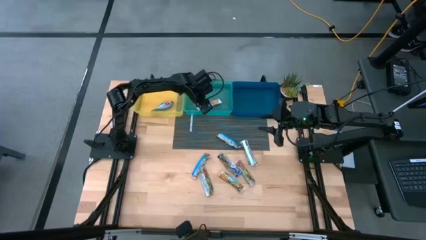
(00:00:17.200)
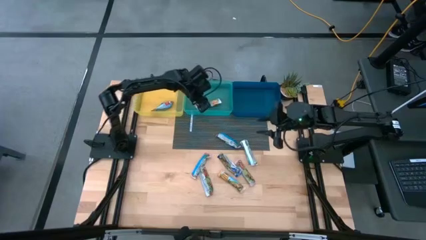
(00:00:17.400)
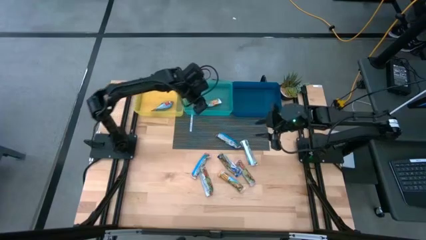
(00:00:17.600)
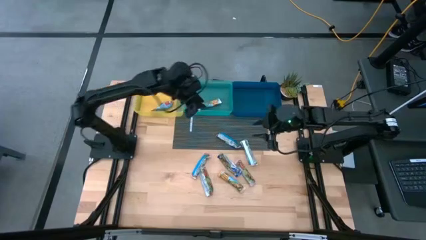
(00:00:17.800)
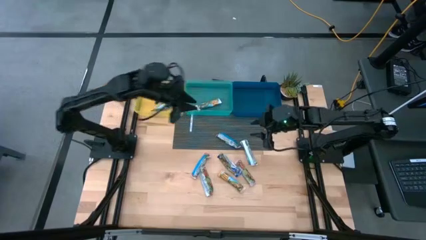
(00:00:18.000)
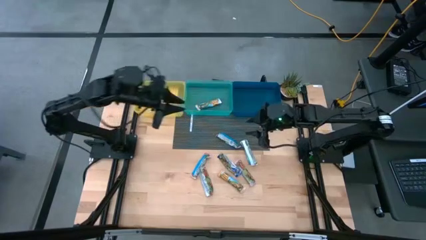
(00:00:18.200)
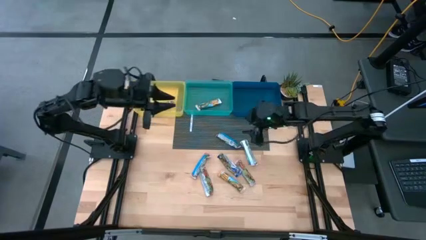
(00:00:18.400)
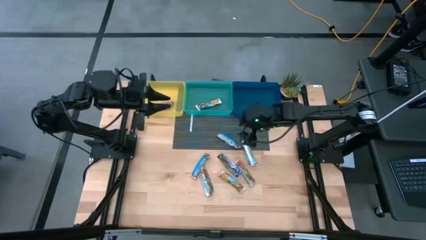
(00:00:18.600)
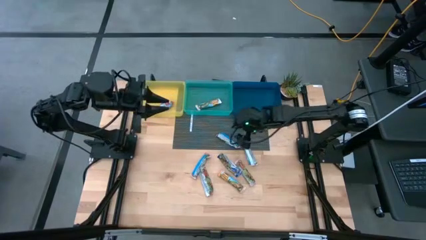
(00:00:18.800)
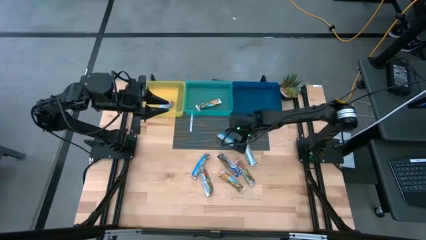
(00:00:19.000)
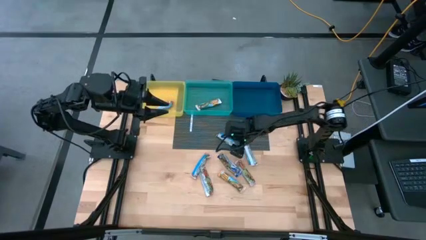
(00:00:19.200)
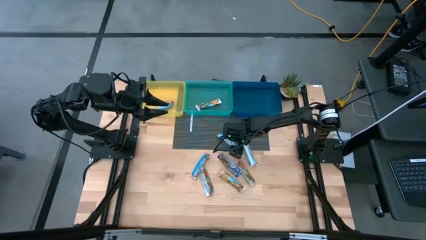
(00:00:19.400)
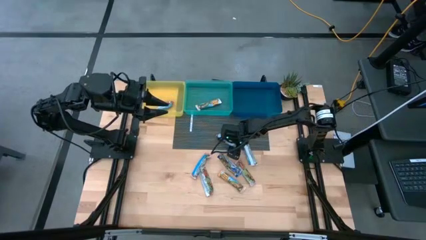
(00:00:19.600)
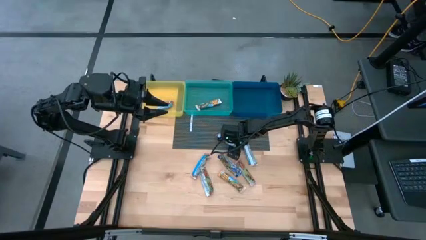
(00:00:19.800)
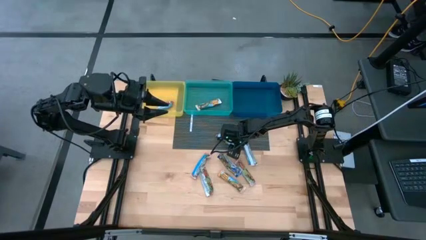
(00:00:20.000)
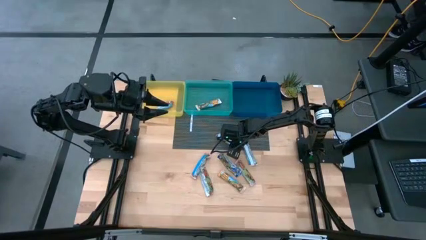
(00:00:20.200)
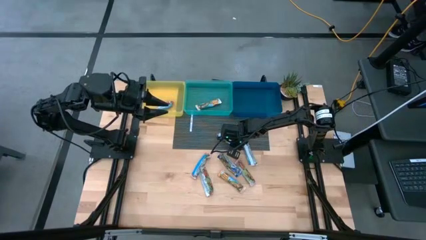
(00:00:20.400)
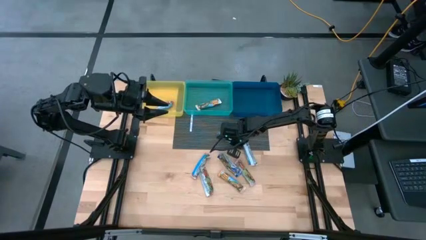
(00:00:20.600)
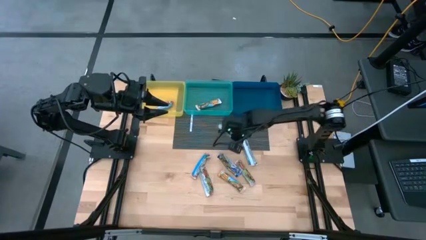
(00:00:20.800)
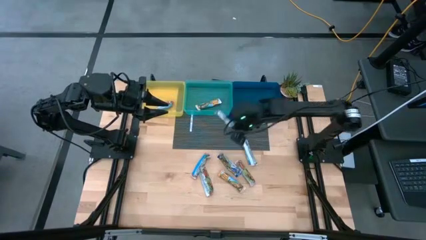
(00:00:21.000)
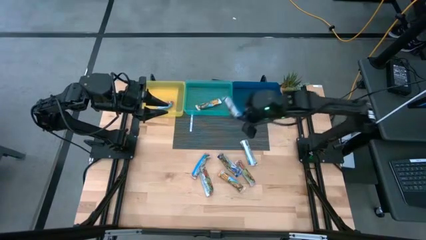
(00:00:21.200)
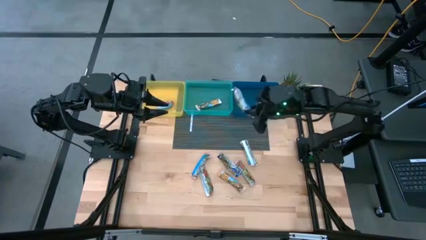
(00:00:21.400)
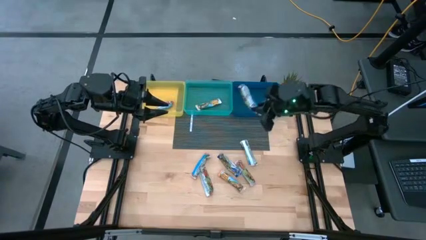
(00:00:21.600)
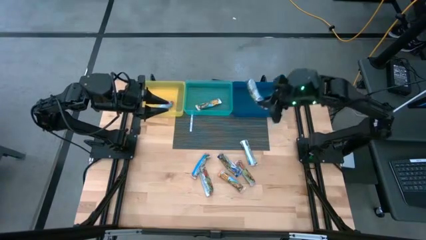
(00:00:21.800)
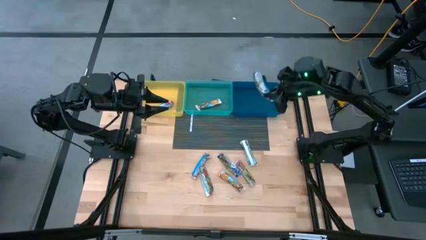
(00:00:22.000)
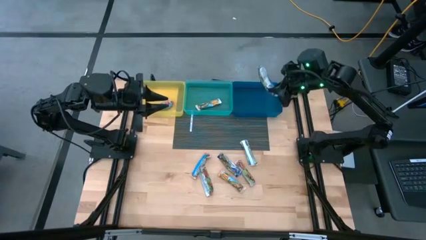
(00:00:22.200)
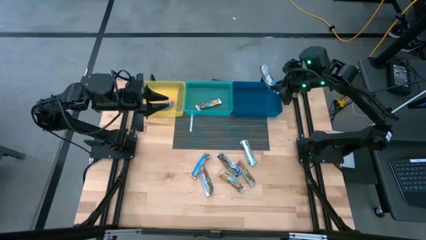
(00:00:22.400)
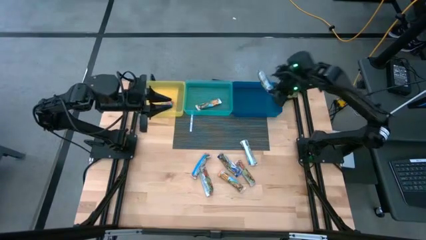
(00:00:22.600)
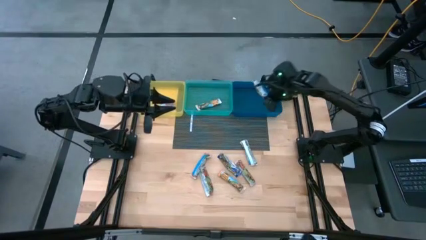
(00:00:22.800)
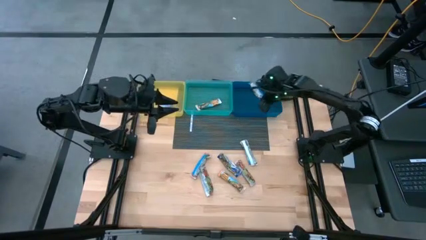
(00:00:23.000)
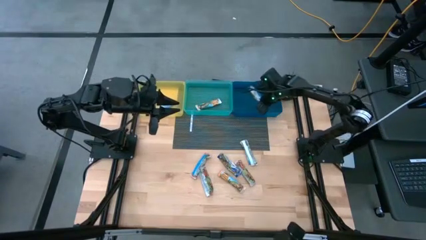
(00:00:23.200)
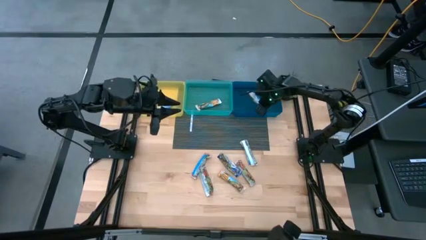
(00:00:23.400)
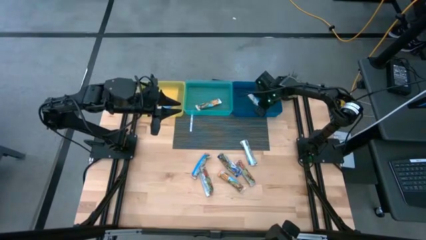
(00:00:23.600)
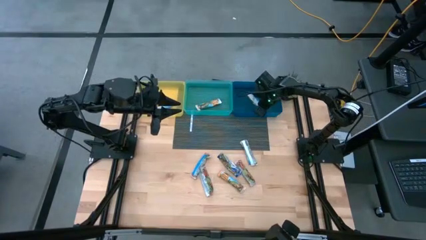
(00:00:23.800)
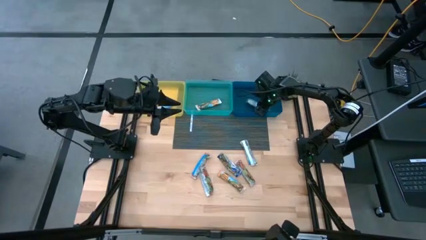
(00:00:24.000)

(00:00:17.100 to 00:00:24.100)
Task: Pick and place Granola Bars by type
Put the blue granola bar into the dark blue bin

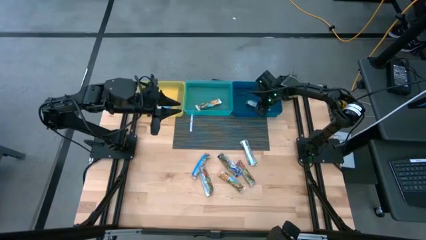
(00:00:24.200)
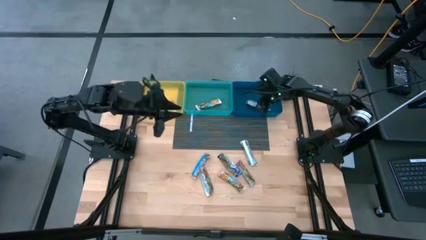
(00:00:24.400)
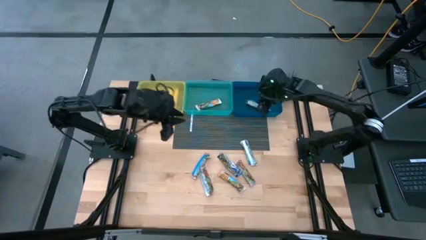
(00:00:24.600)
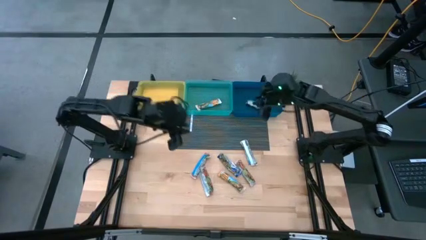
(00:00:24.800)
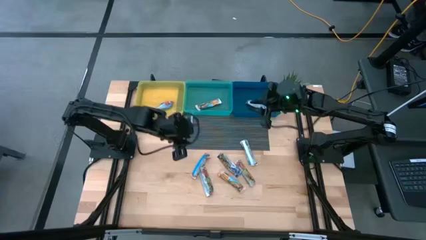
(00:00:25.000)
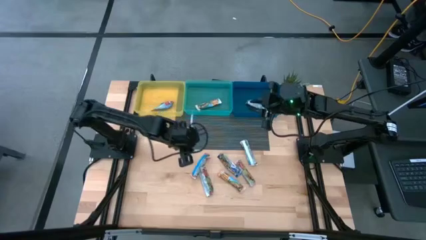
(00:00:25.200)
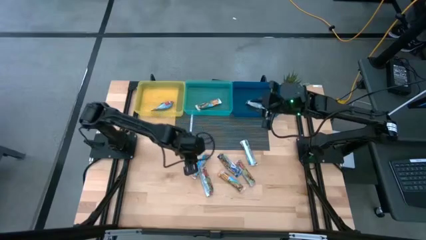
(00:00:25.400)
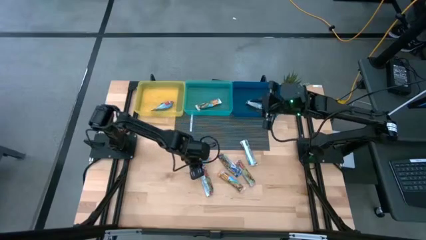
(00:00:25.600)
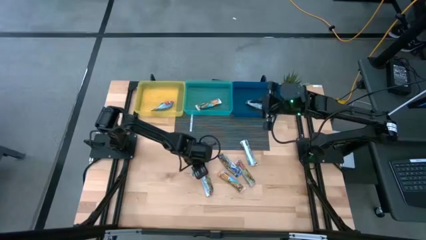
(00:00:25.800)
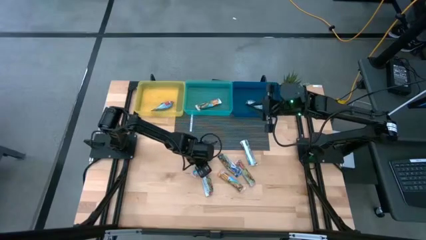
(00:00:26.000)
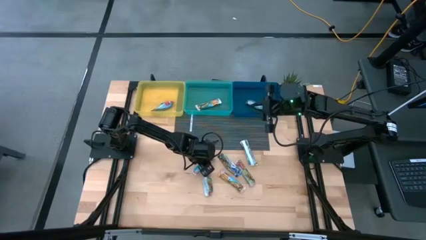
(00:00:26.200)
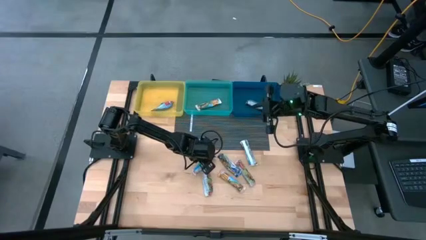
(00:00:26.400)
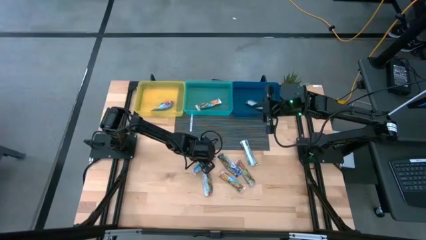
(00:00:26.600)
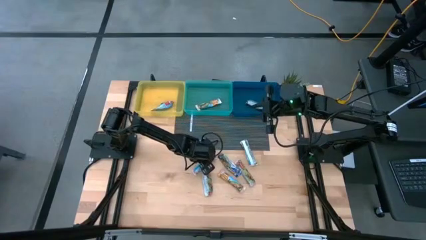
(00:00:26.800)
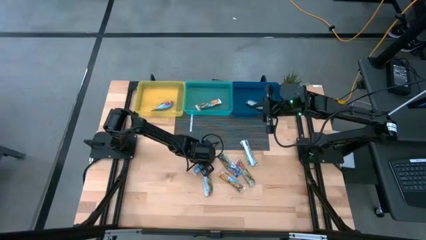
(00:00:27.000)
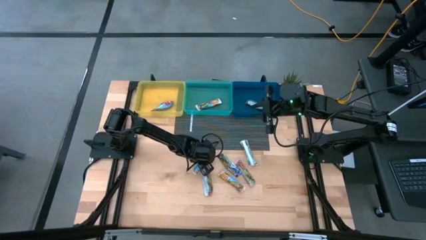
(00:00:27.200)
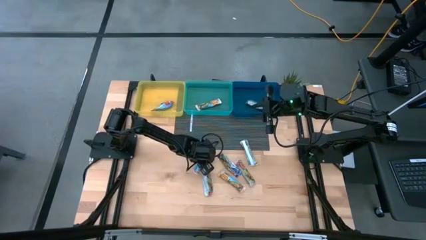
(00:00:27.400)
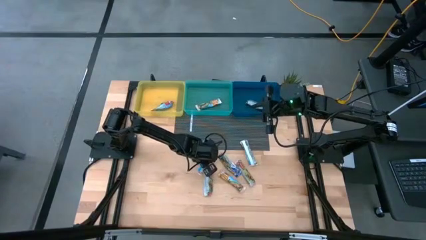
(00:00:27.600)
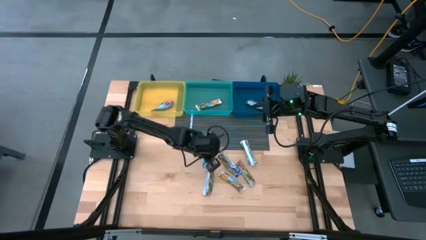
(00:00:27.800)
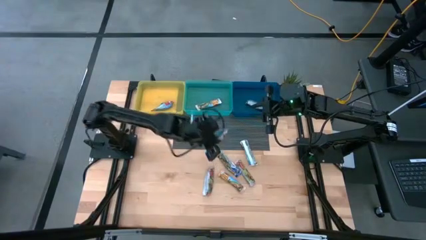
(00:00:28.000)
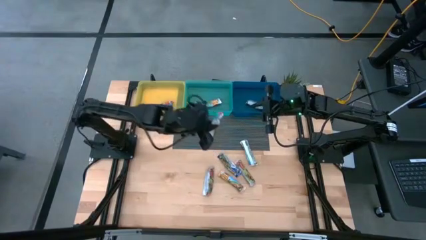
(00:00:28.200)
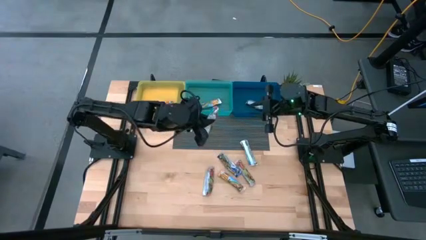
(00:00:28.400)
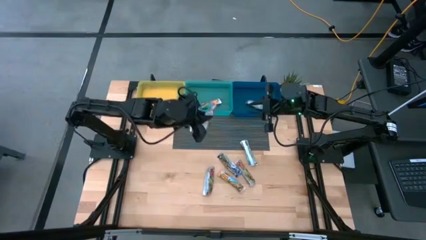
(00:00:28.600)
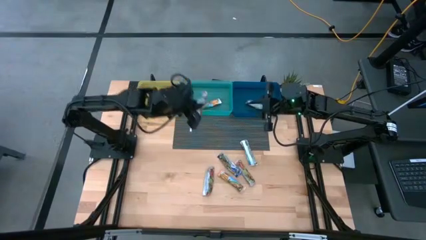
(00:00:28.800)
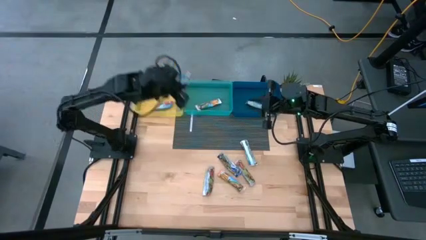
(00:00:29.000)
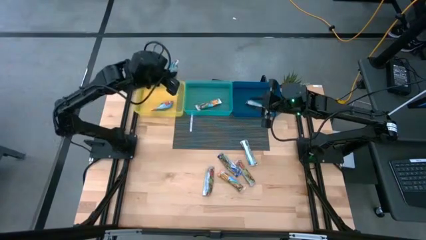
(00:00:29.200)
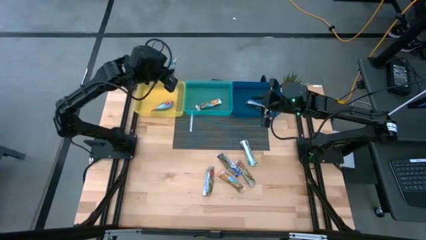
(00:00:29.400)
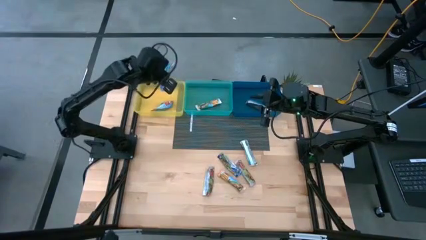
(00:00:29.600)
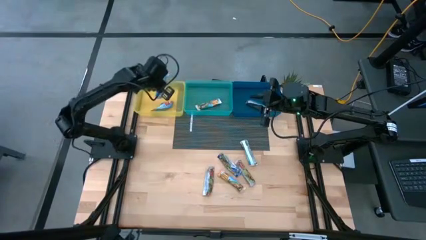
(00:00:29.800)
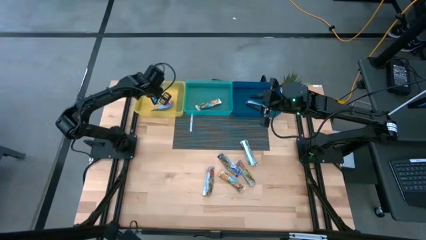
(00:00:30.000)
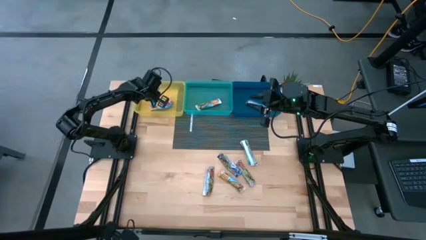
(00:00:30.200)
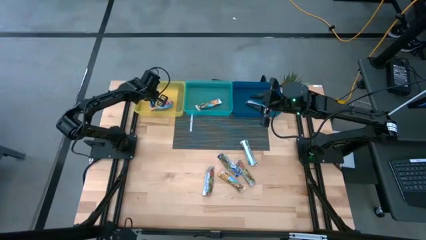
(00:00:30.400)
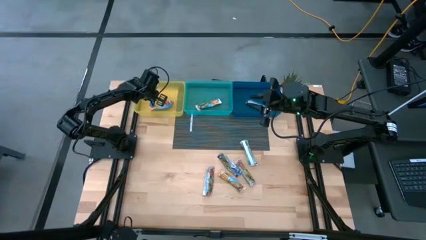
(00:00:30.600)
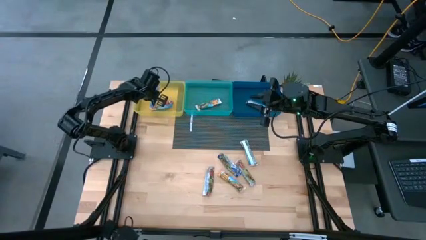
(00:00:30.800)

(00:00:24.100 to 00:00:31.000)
Put the red granola bar into the yellow bin

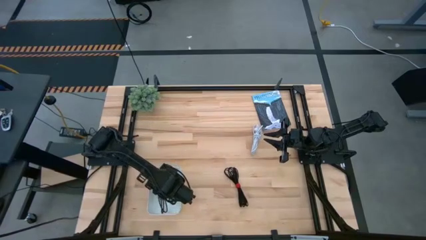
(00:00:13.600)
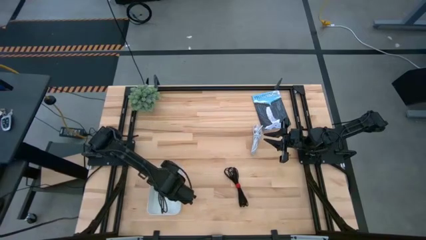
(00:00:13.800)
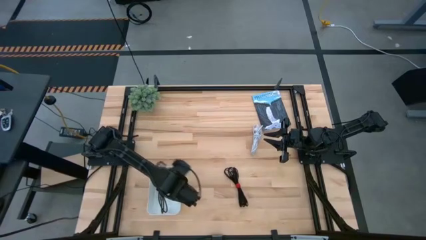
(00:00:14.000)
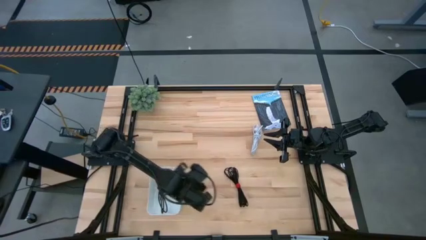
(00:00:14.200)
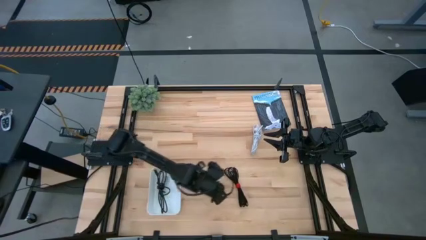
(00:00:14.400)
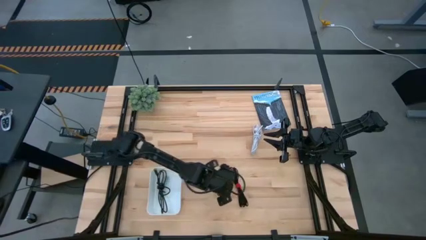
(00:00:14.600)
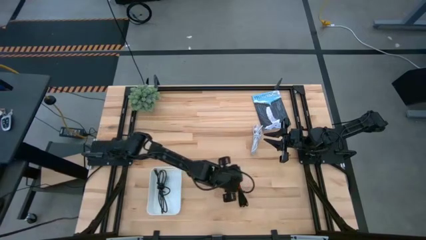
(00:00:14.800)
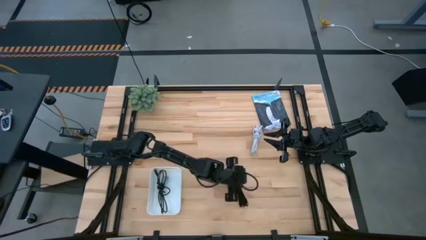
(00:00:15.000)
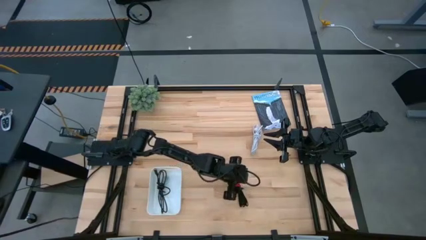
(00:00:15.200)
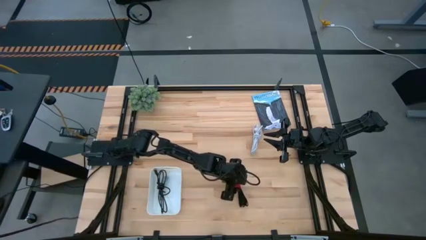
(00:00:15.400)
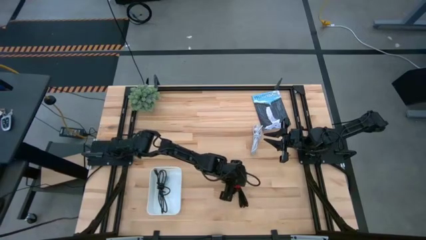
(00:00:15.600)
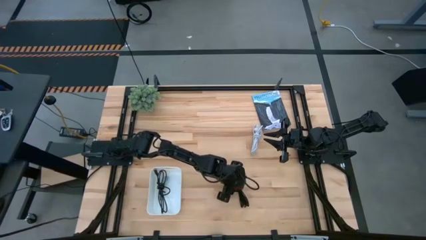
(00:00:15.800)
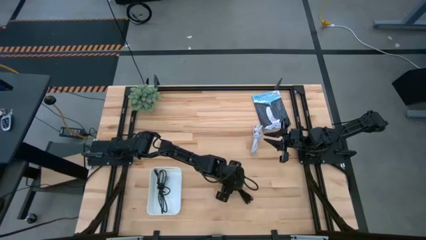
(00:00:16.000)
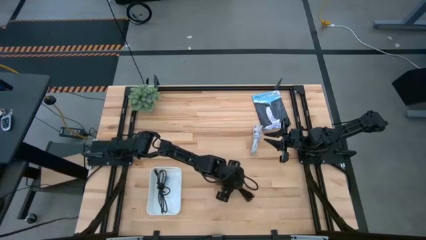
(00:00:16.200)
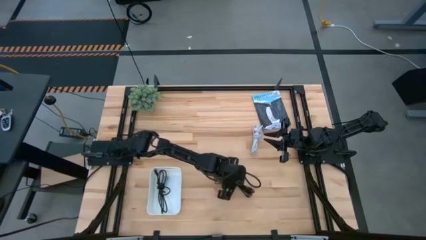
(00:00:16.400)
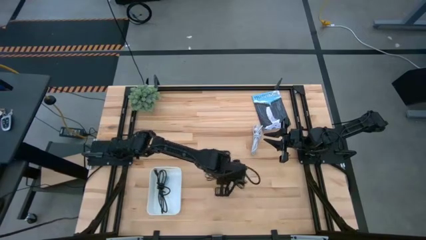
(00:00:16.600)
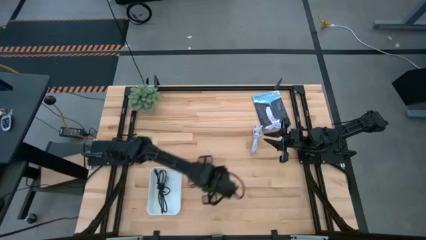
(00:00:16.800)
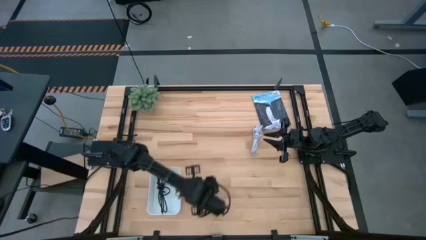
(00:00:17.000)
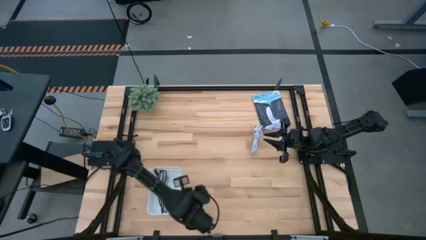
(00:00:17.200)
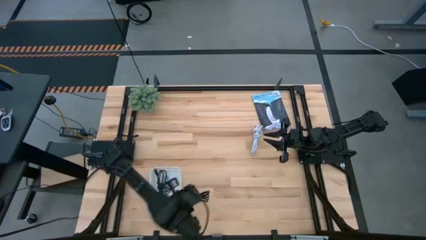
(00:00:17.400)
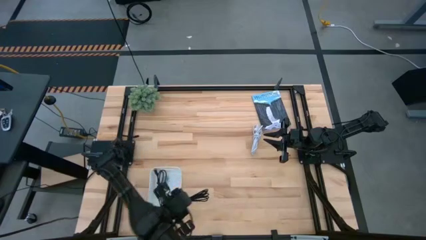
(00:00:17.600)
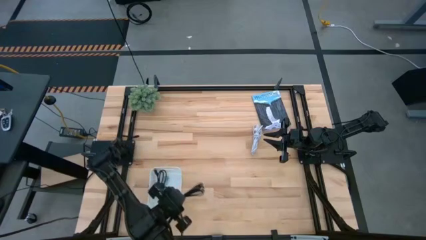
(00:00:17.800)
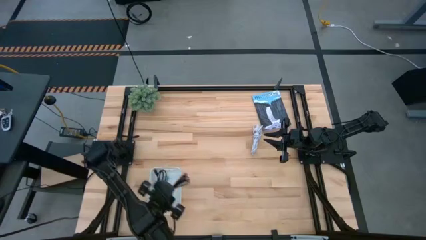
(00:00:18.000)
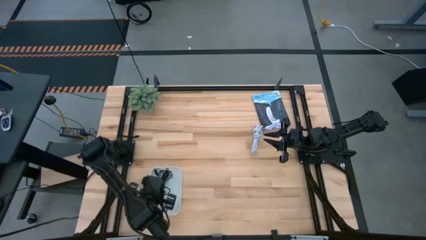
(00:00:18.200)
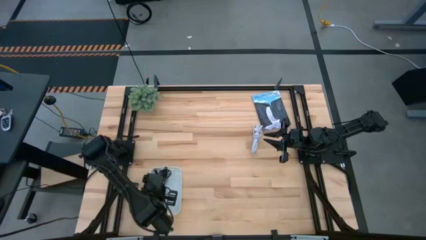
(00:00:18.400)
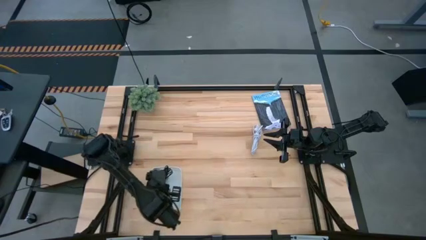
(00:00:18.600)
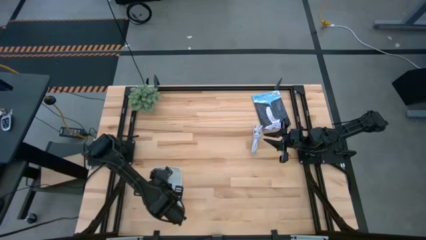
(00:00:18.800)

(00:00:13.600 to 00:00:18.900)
Task: Pick and place USB-C Cables
Put the black USB cable into the white bin
